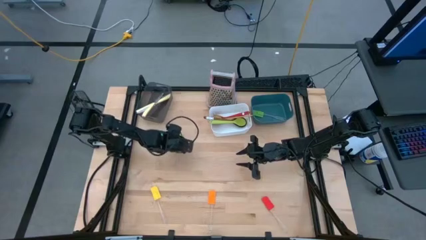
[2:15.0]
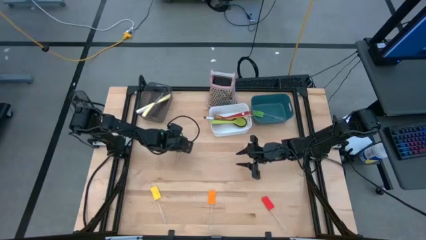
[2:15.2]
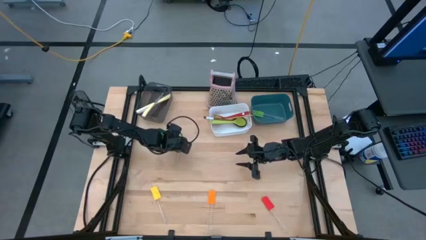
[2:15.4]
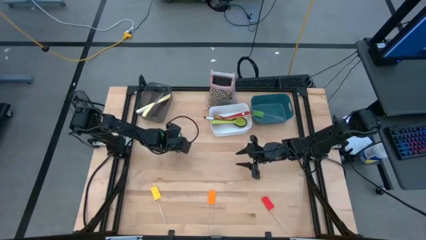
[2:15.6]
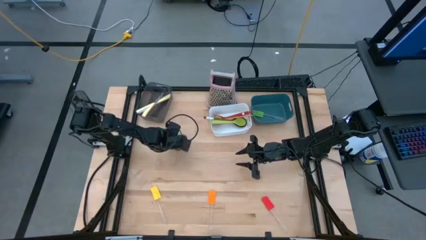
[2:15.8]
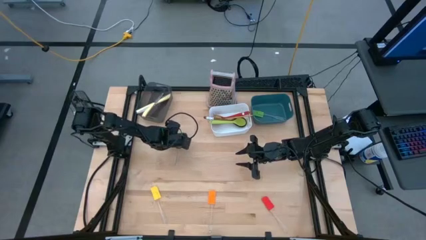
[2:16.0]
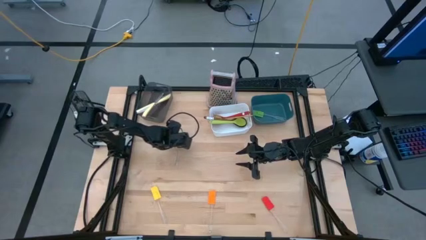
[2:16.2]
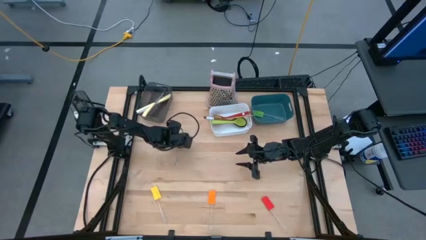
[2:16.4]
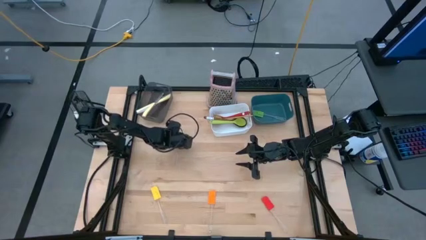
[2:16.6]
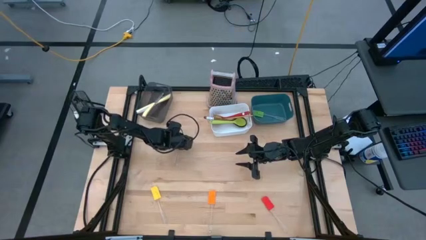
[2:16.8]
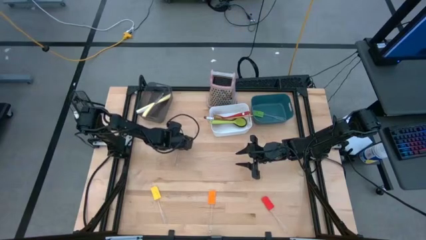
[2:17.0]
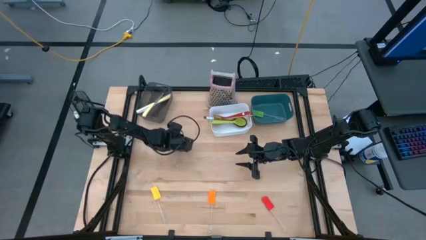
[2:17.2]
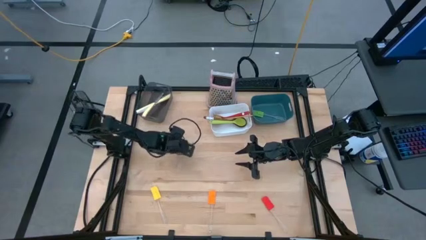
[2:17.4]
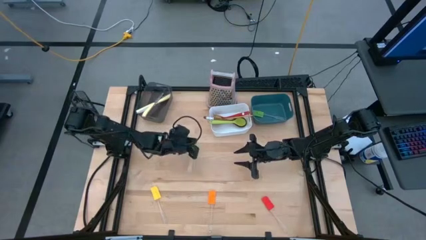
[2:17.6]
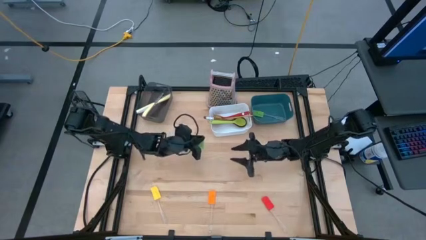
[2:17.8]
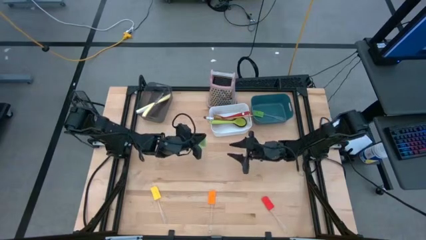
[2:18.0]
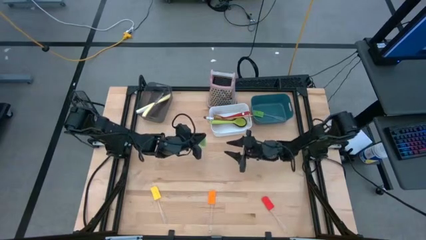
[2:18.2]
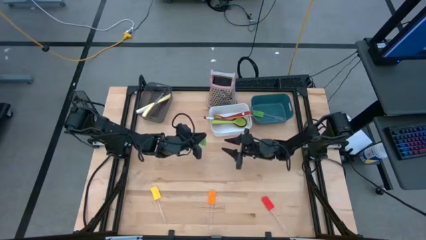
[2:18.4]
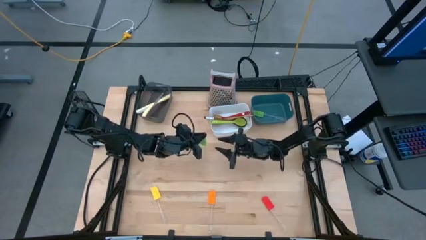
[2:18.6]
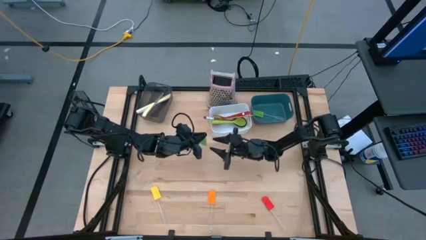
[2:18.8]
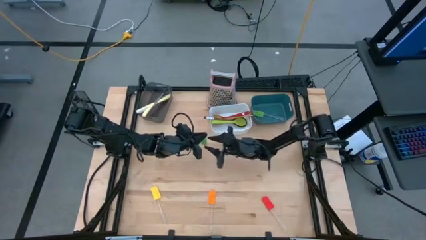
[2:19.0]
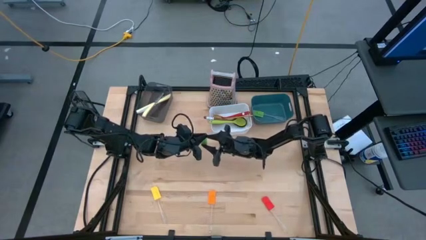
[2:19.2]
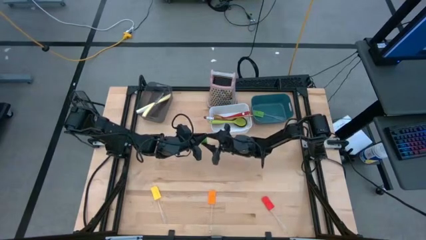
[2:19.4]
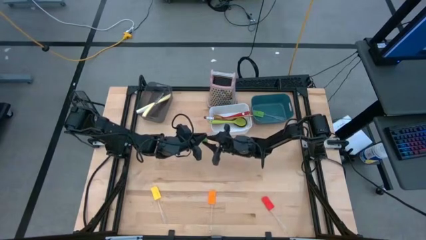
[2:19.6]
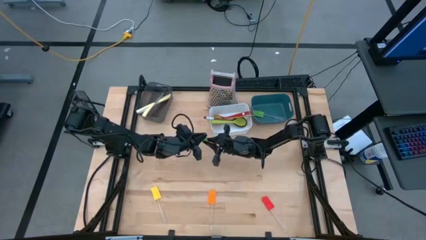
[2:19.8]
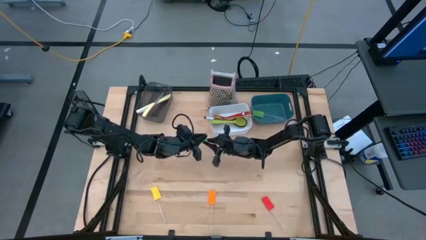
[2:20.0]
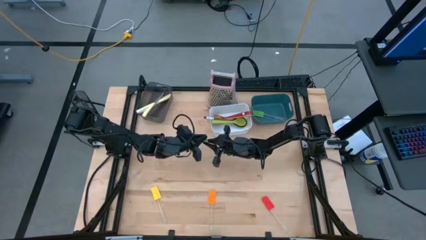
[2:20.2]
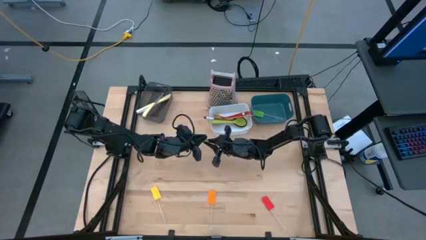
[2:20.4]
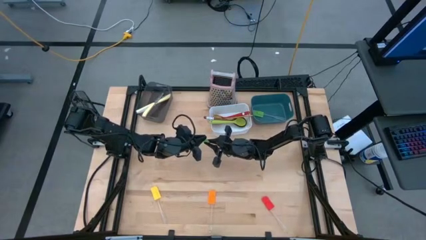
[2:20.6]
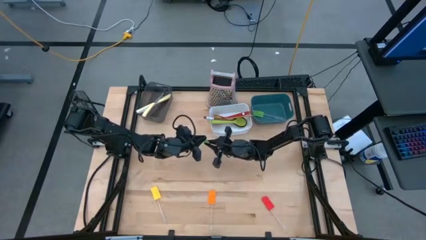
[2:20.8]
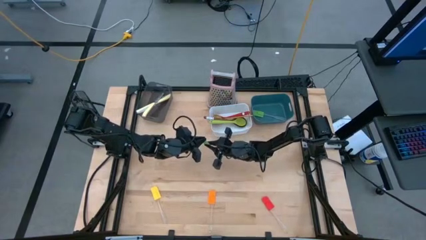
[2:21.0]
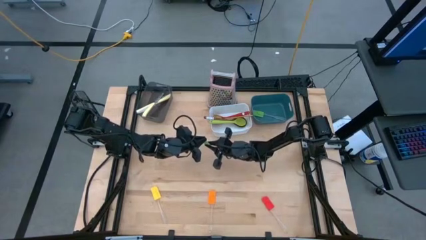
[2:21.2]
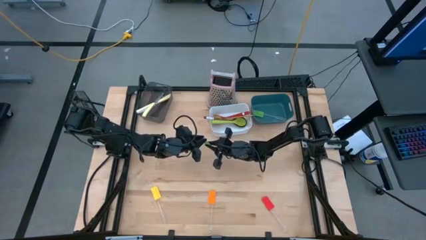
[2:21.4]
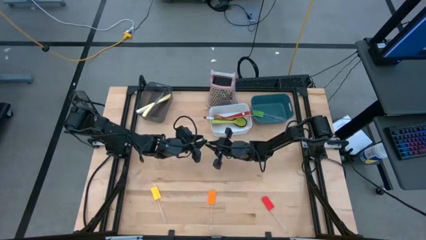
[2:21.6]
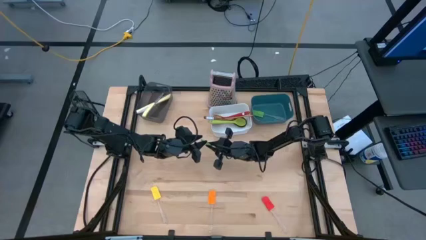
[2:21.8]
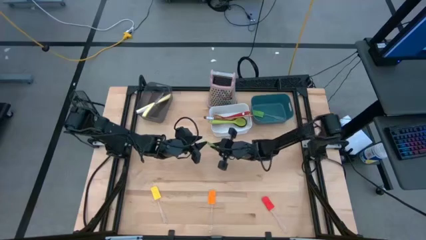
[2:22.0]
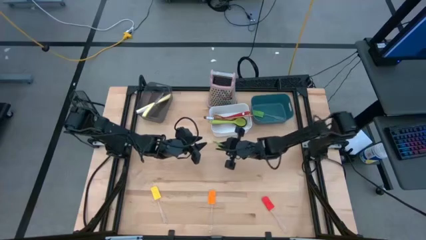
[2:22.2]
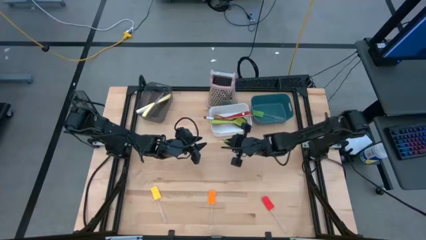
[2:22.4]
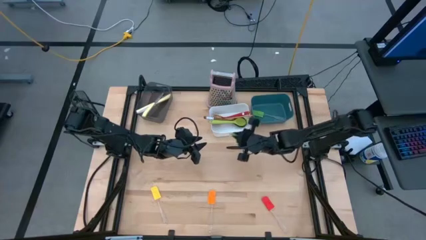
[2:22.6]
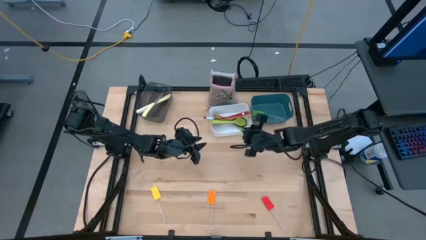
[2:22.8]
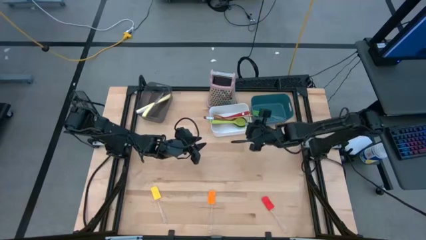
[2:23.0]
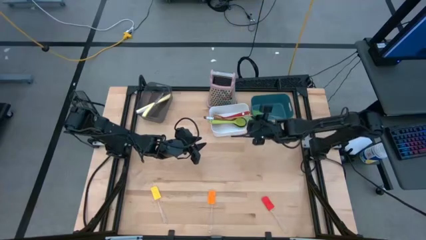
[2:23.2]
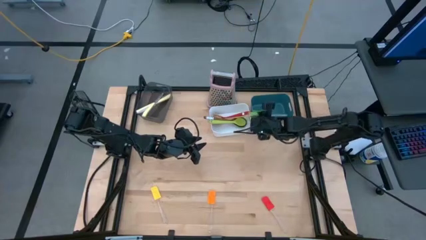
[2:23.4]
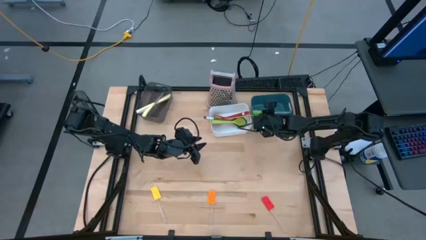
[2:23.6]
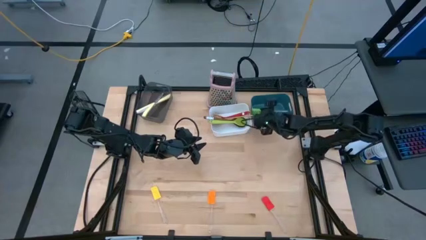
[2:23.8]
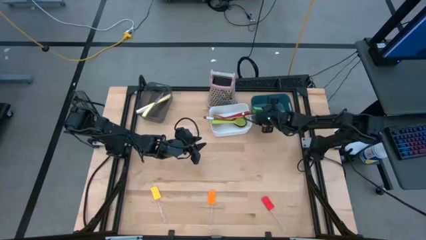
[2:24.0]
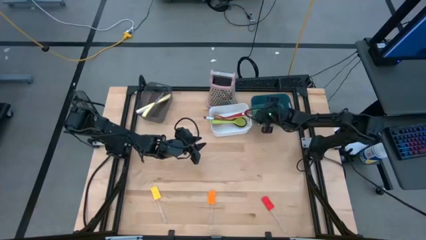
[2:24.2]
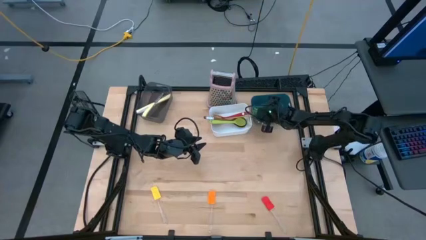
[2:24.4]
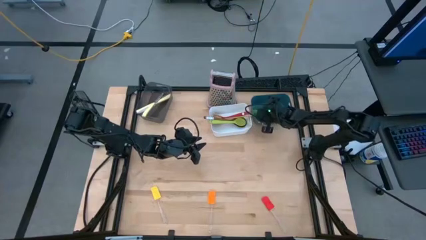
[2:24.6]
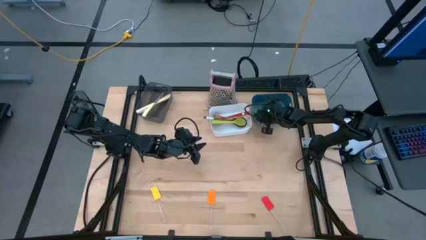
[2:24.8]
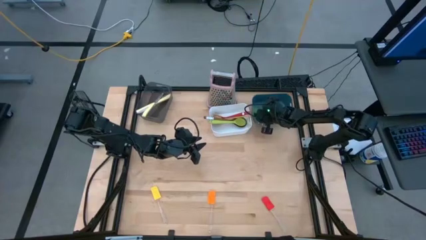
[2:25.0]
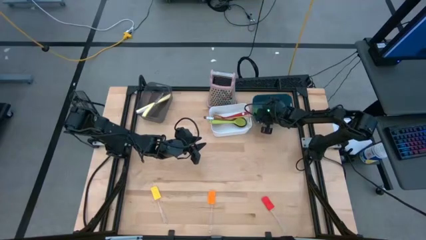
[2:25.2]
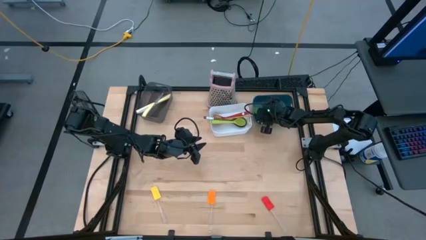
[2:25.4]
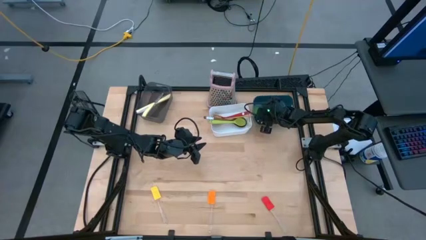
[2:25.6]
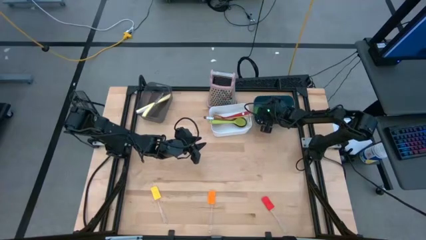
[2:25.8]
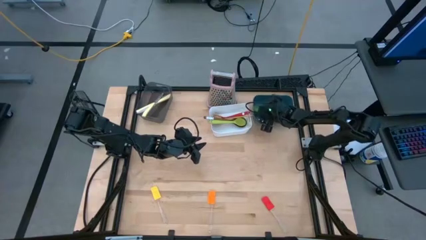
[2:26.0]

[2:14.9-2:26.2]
Task: Pick & Place Kitchen Items
Put the green spatula into the blue bin

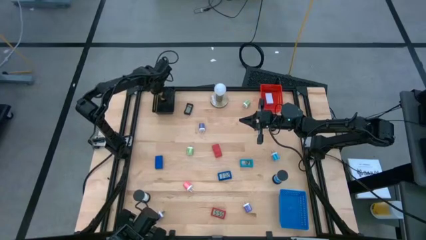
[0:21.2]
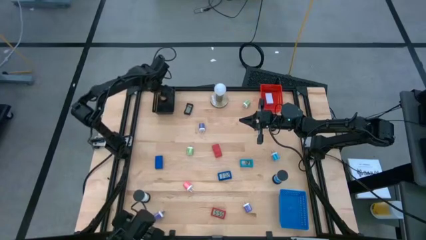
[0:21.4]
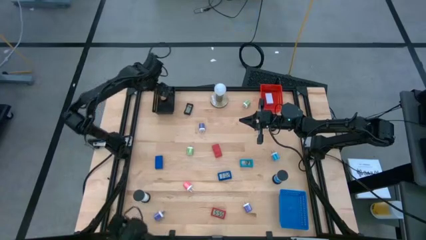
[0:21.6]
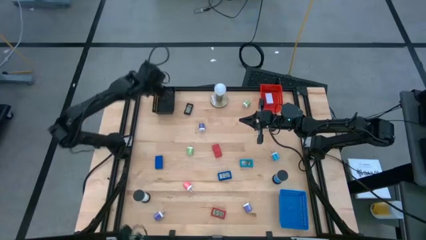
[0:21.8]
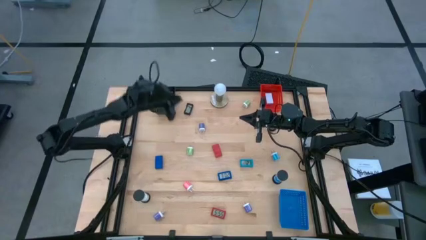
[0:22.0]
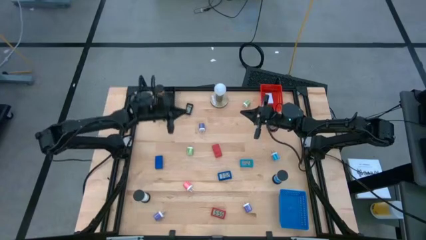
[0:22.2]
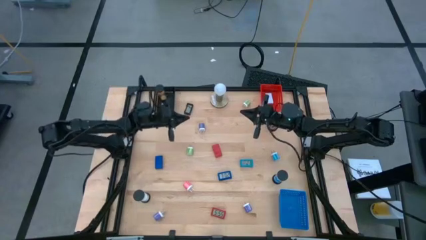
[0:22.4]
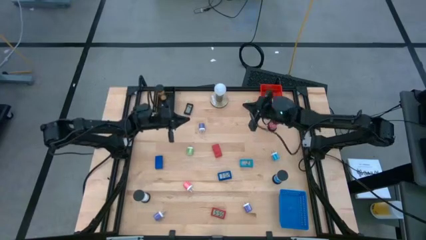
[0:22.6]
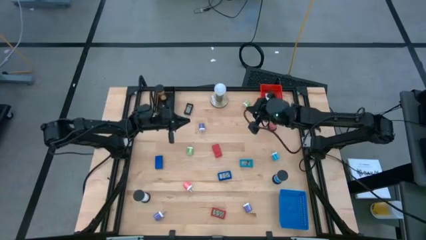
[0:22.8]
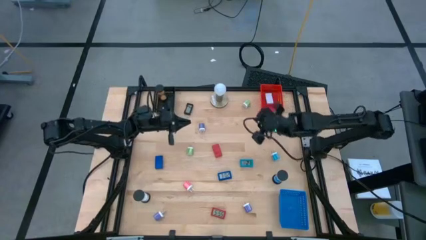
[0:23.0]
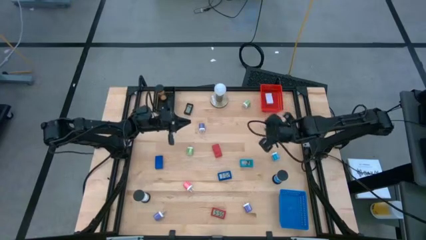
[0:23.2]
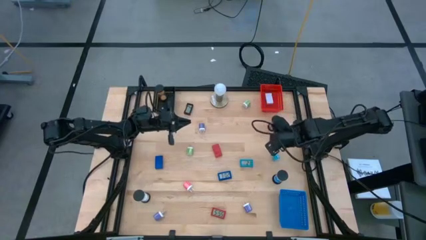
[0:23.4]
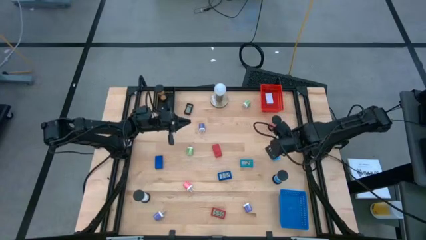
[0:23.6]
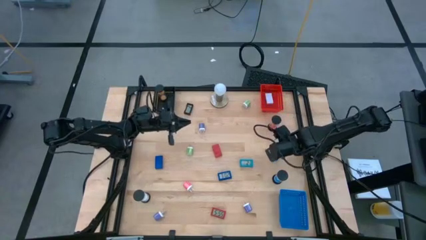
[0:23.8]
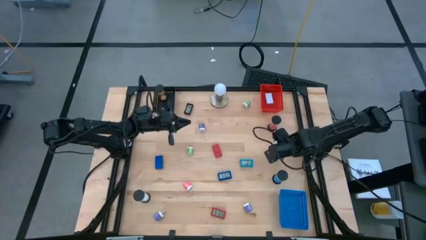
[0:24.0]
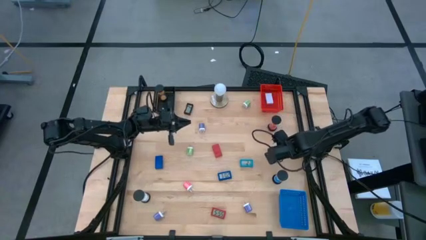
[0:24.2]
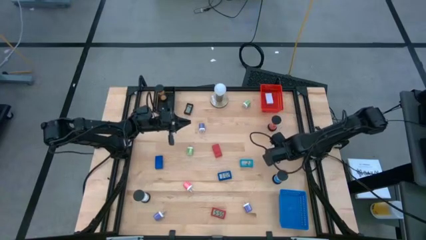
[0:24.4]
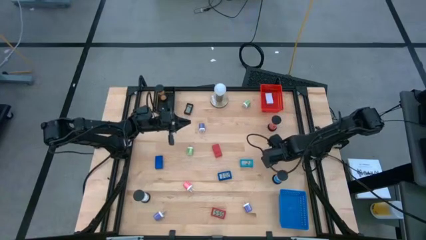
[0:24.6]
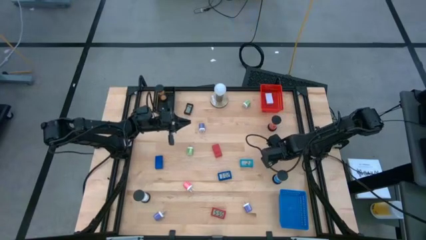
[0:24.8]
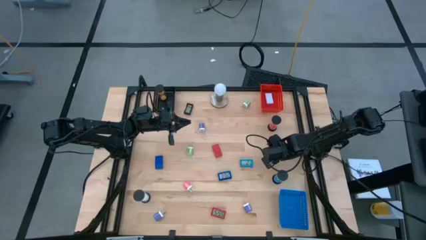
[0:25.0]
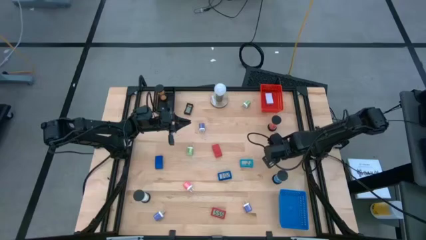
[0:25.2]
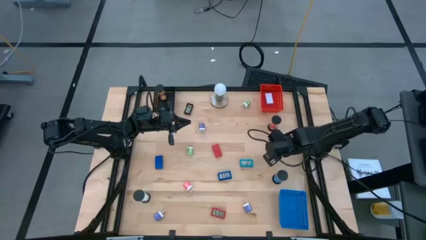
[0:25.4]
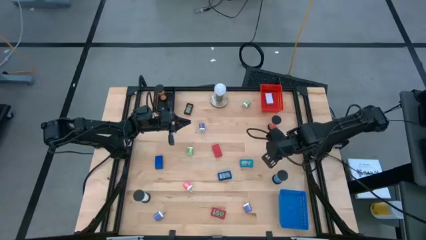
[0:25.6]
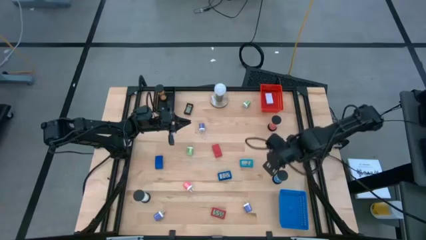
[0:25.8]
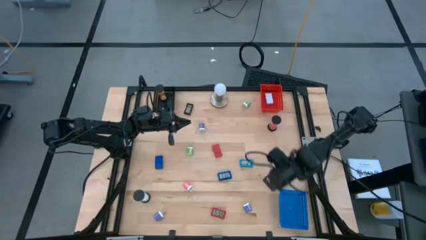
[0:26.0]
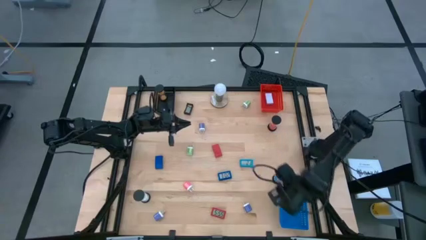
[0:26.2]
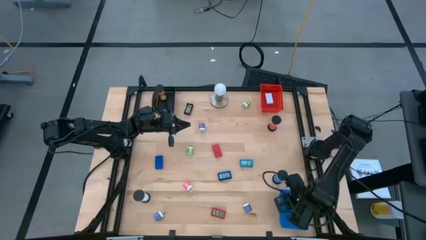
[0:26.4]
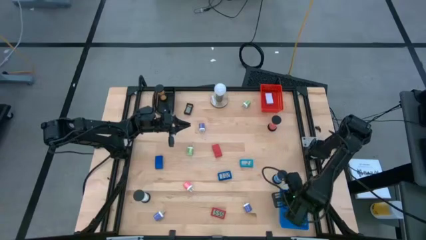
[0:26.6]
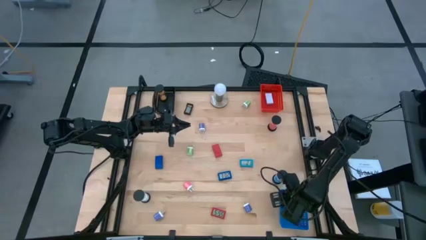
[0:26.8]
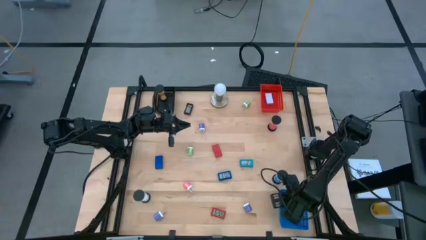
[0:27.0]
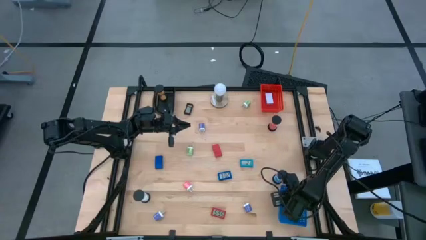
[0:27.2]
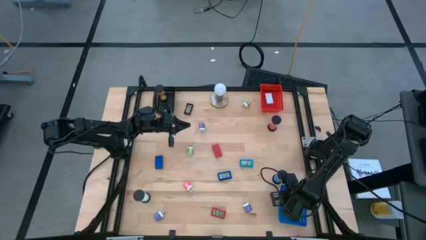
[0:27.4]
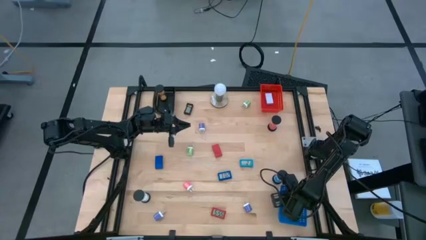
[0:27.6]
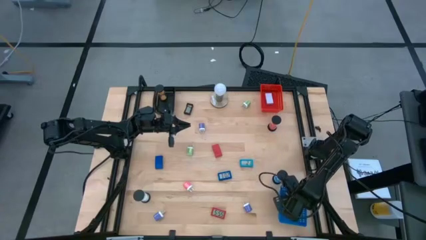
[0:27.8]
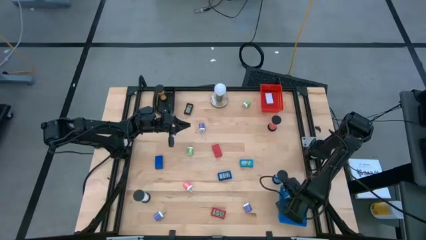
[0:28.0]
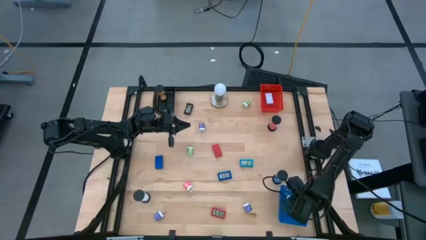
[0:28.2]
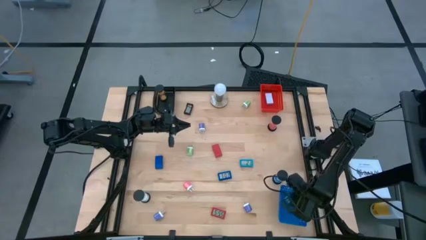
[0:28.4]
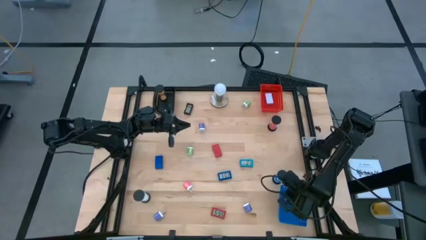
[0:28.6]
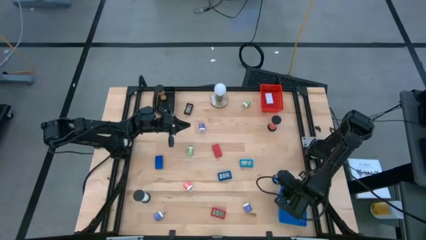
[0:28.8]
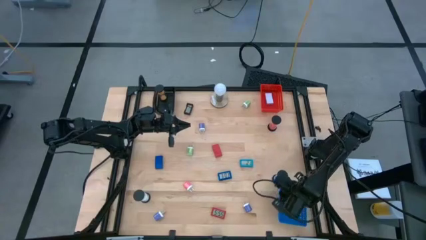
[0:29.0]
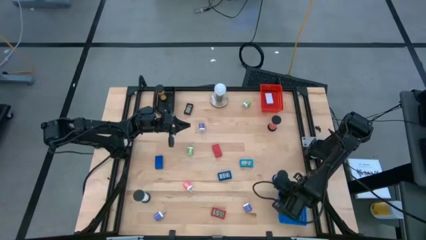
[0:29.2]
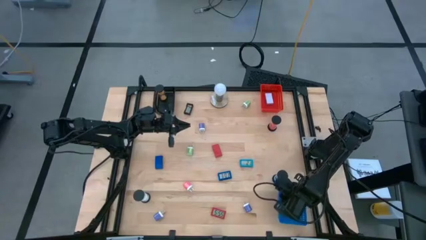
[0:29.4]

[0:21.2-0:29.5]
Task: Pick & Place Office items
Put the light blue charger adapter into the blue bin
